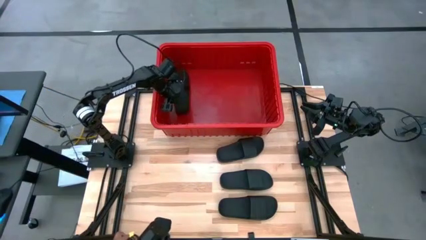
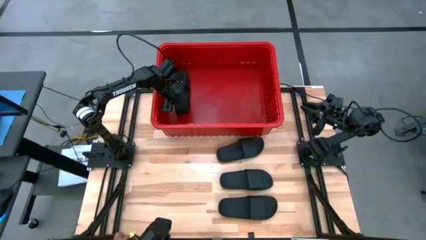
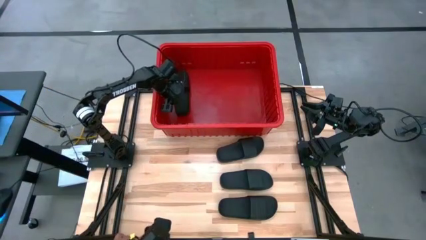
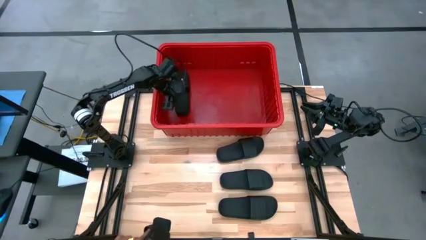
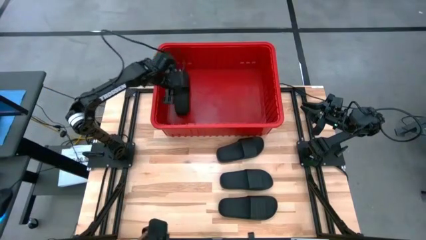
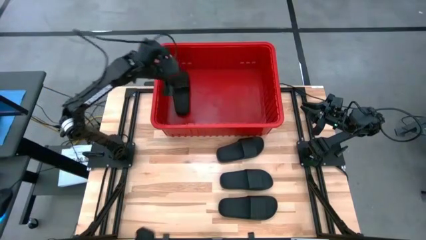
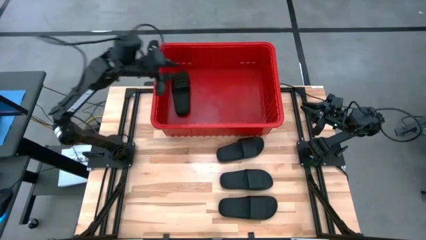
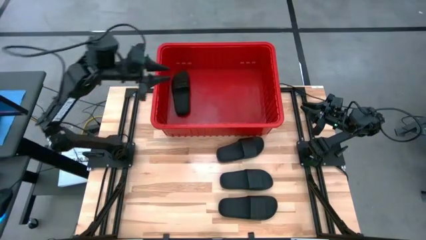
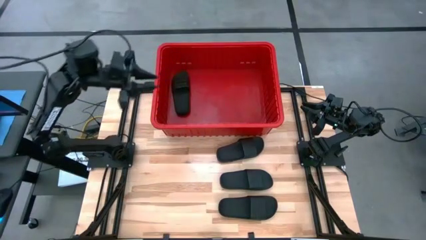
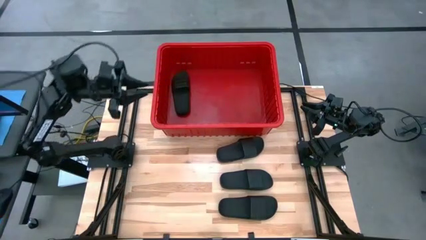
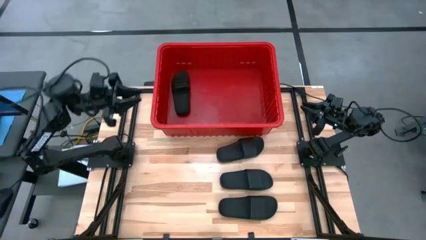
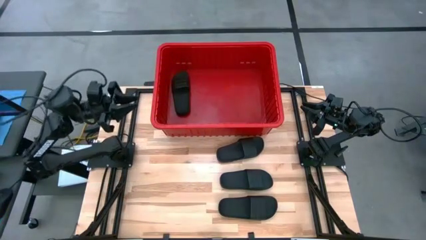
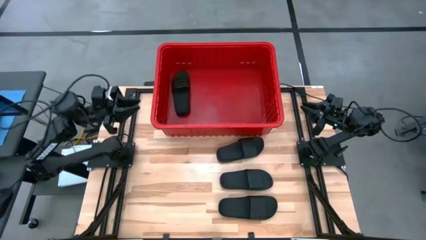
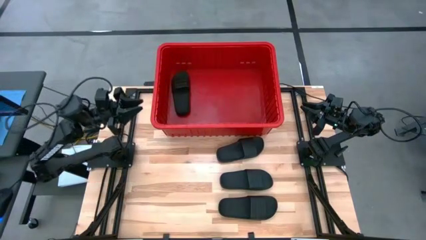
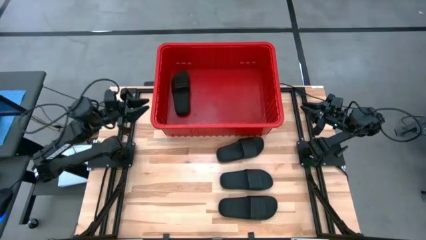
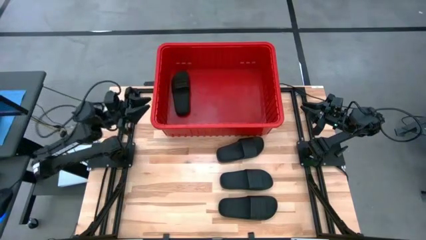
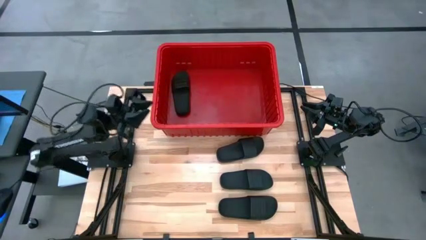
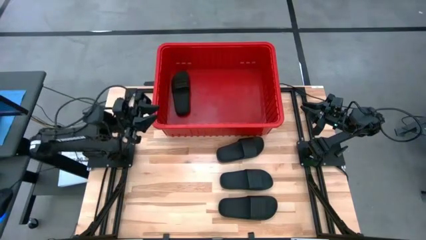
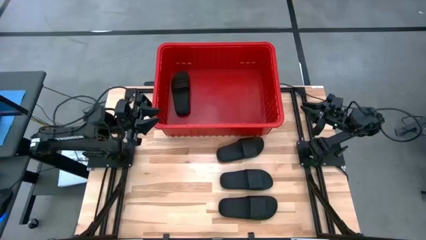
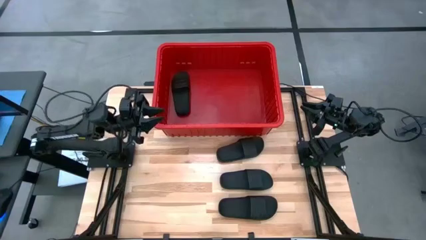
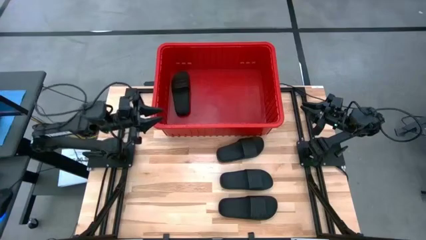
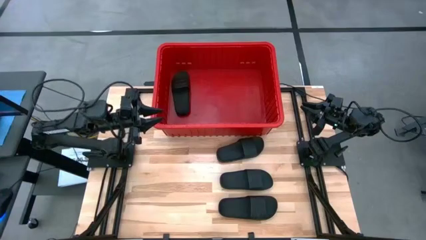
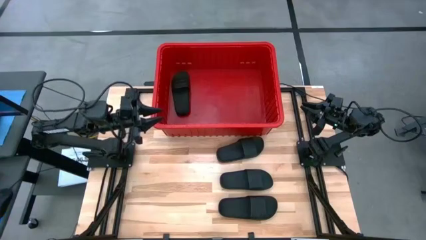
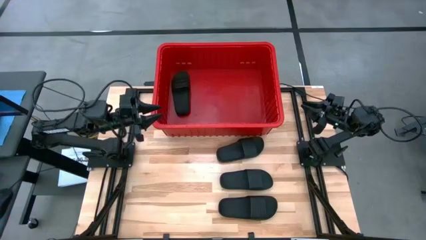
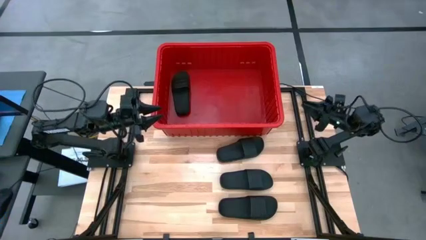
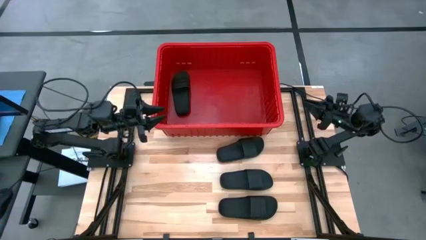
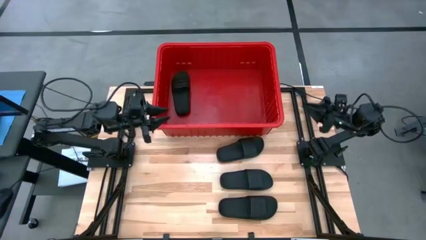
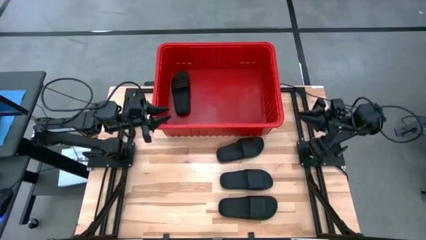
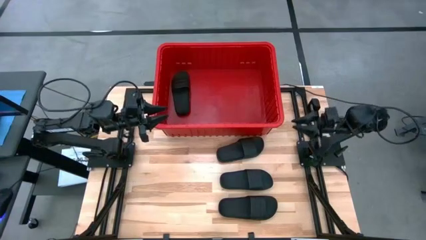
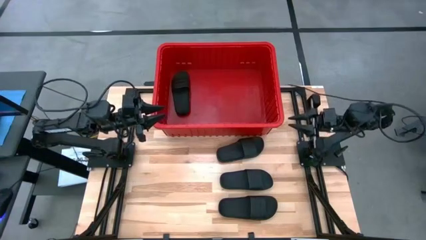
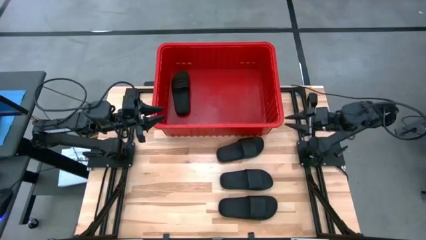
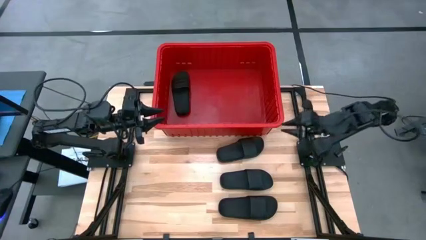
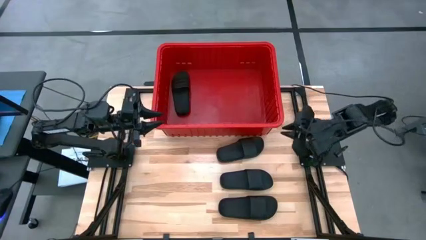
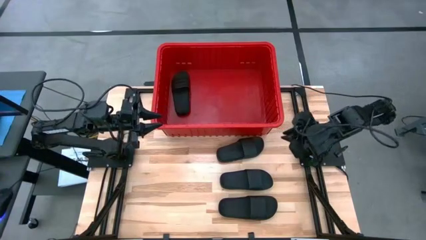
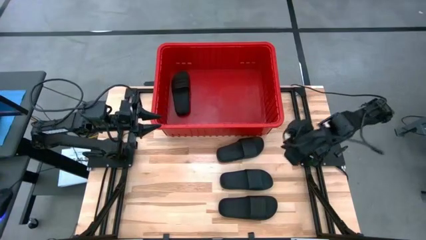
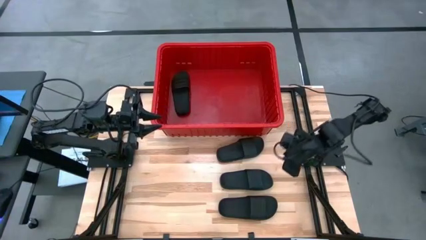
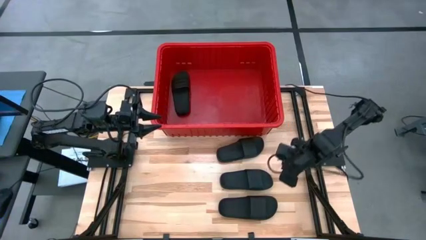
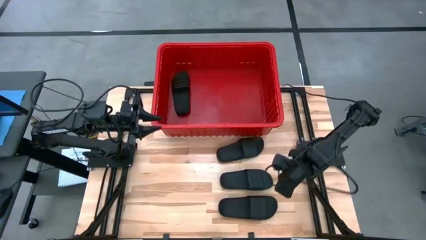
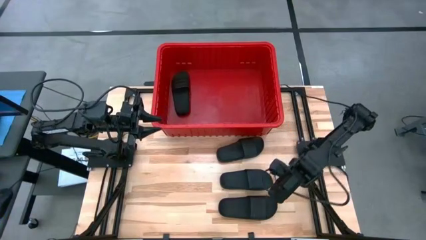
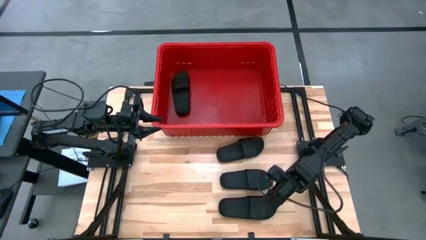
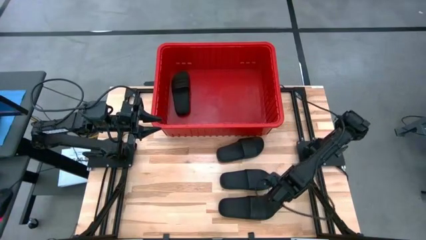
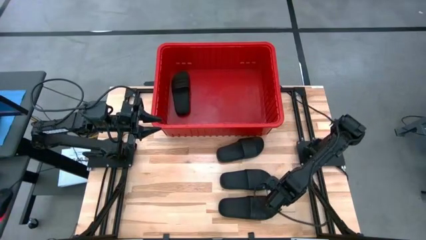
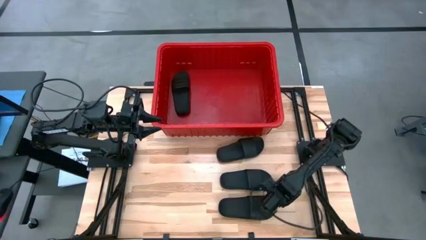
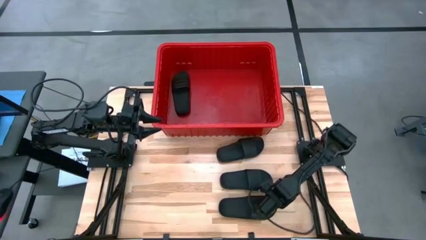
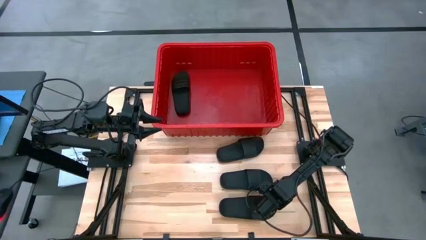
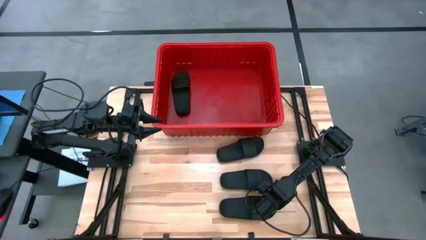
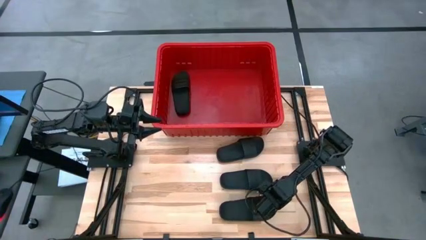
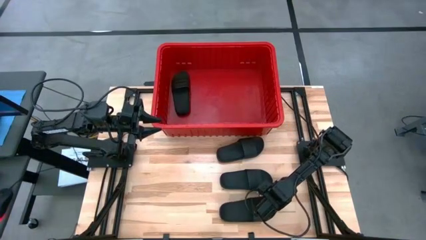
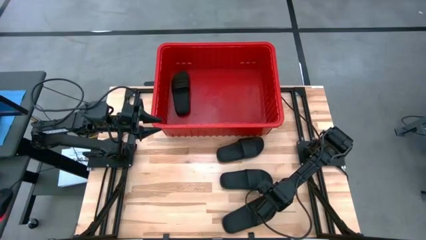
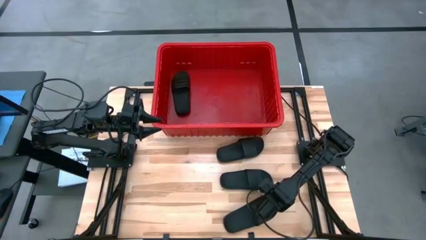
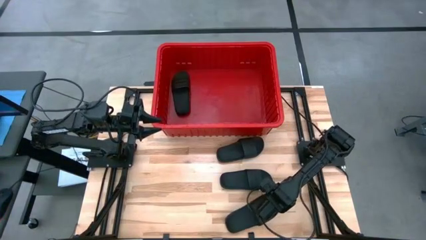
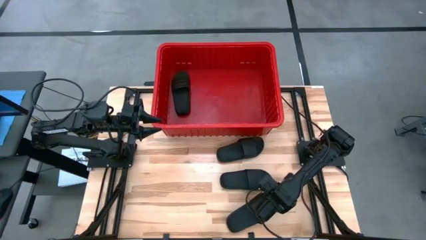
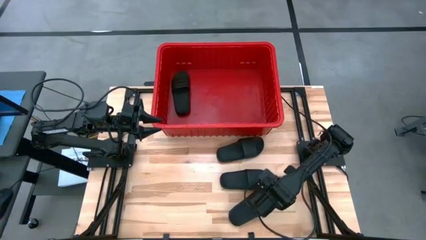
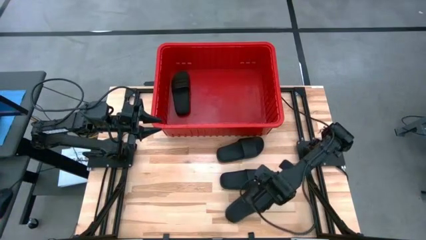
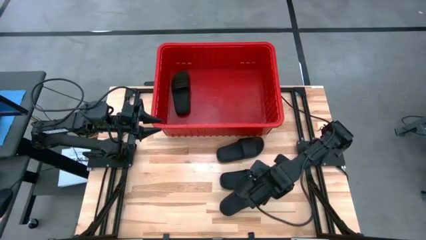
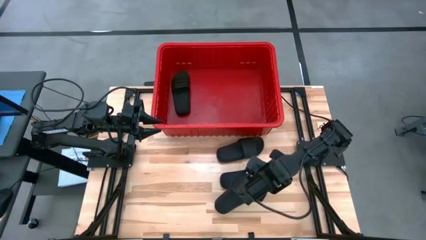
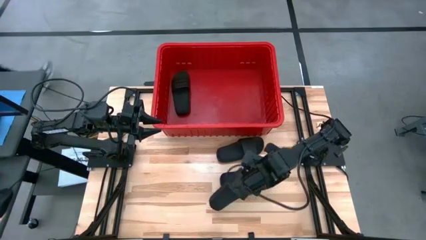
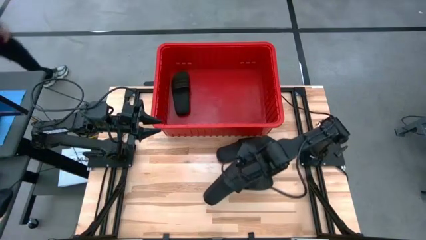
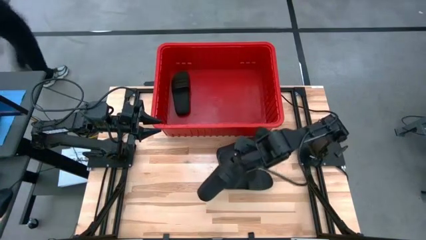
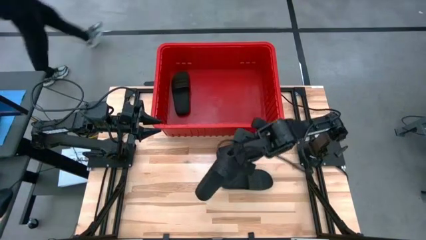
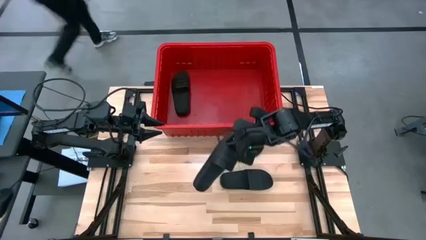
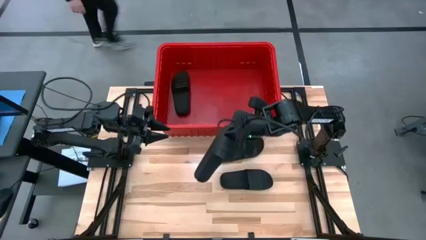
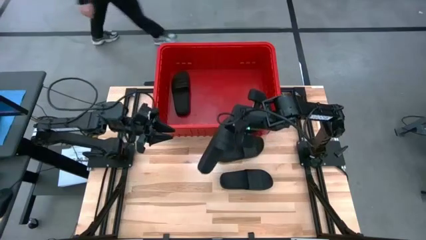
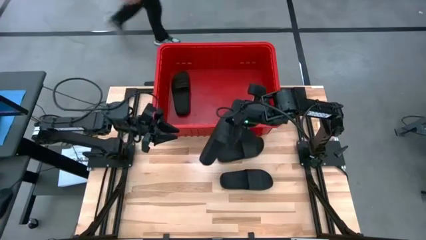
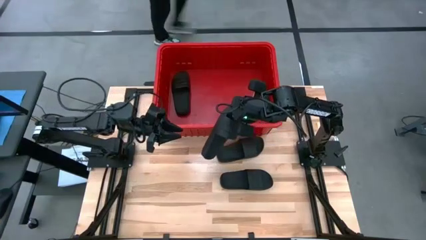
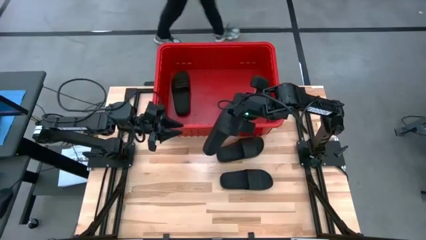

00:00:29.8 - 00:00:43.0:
Task: Pick and place slides into bin
Put the black slide into the red bin
